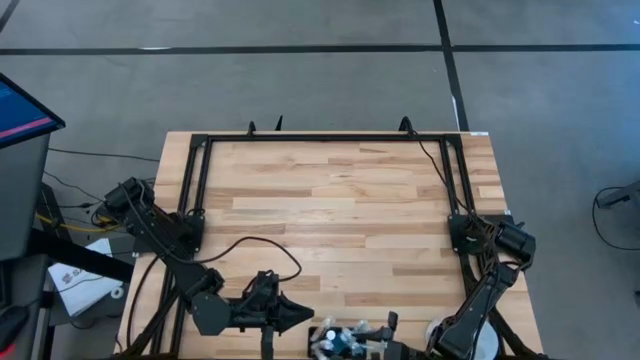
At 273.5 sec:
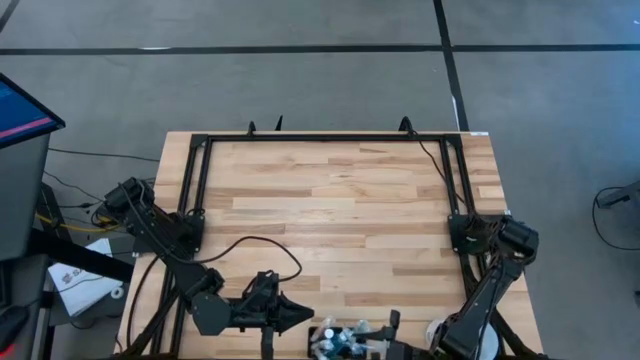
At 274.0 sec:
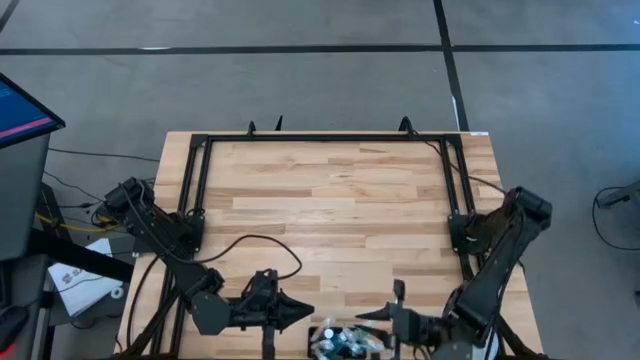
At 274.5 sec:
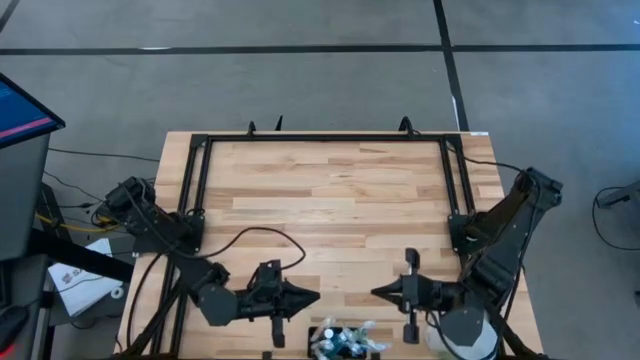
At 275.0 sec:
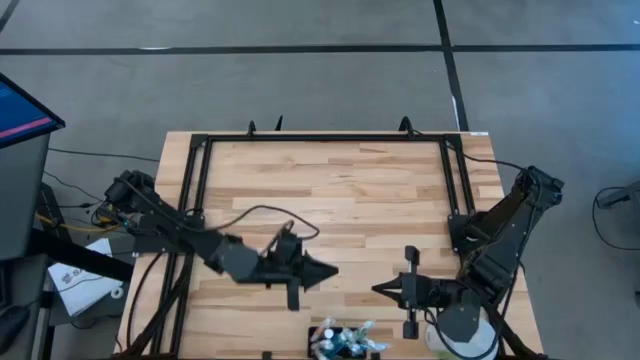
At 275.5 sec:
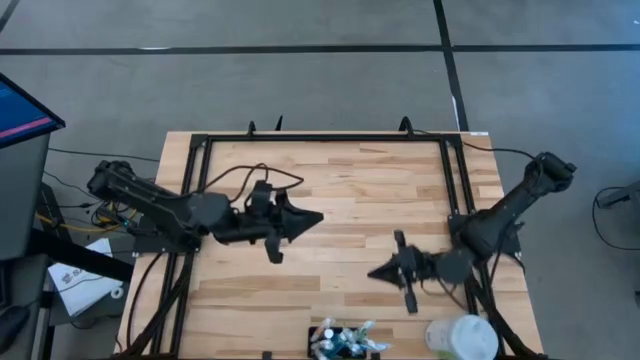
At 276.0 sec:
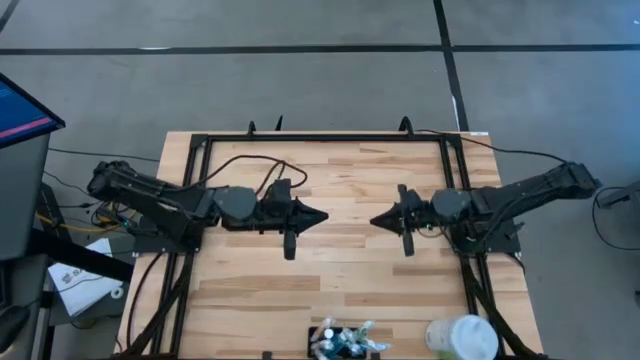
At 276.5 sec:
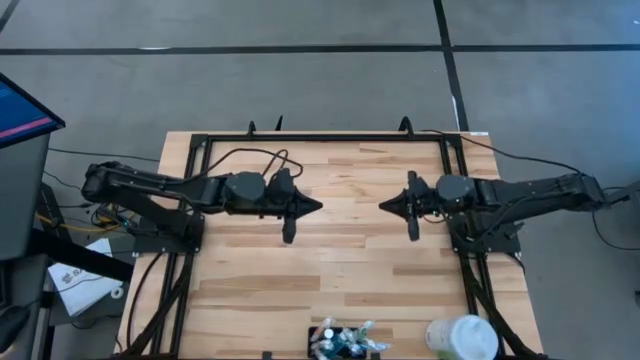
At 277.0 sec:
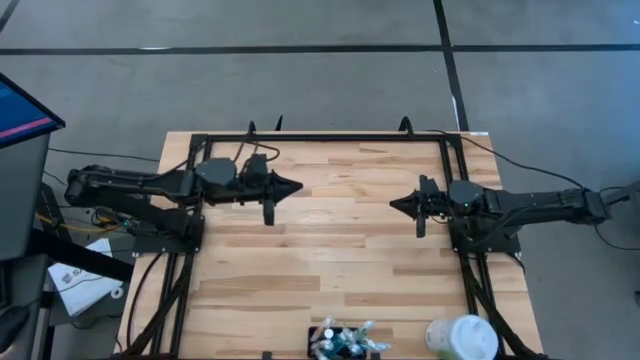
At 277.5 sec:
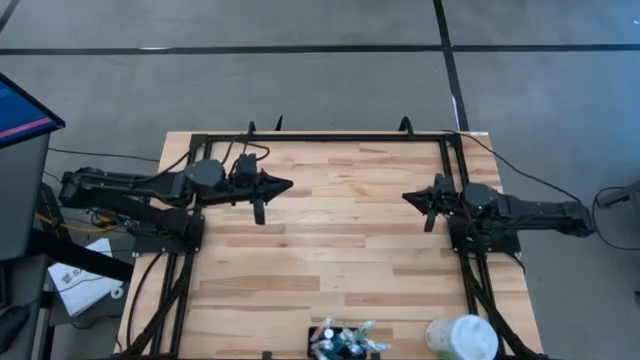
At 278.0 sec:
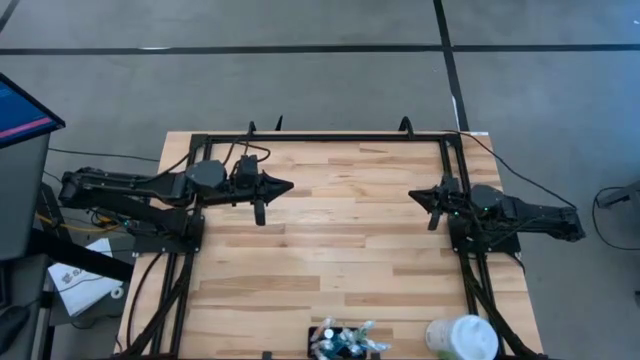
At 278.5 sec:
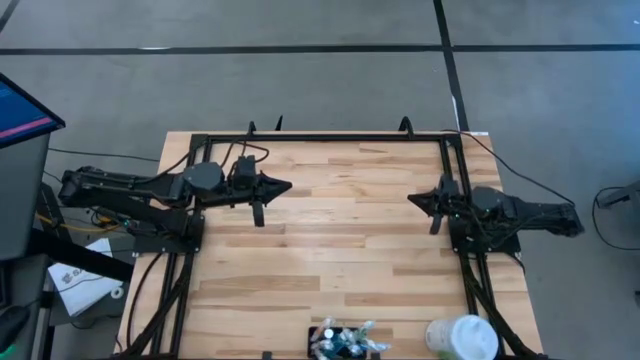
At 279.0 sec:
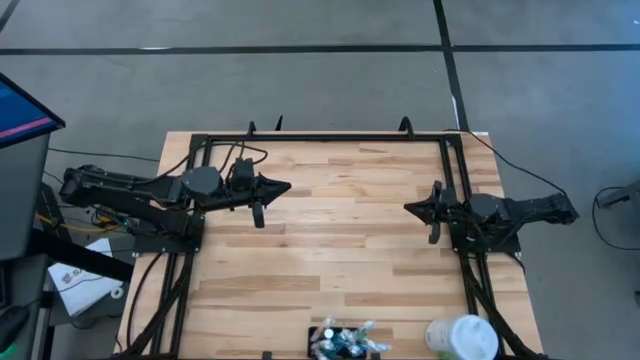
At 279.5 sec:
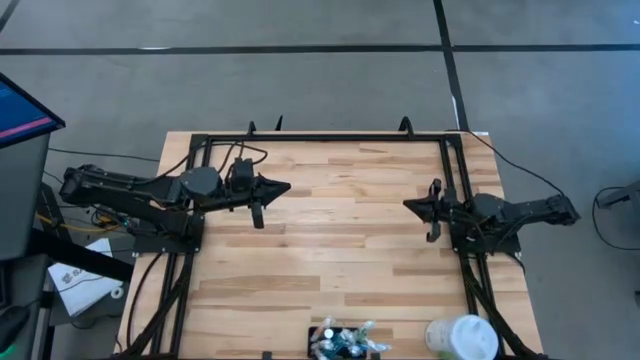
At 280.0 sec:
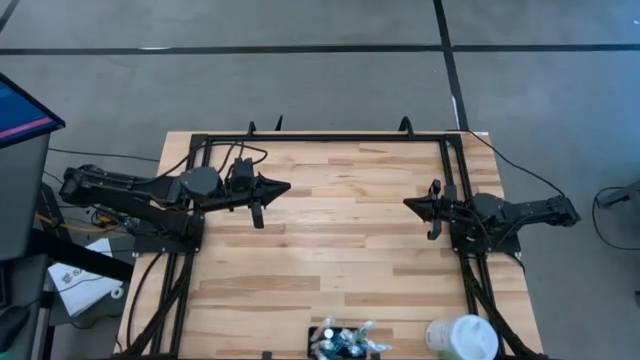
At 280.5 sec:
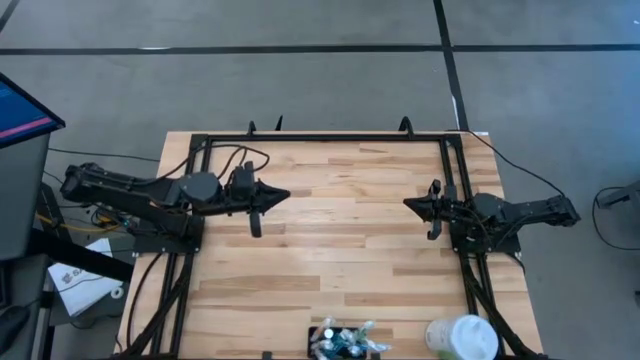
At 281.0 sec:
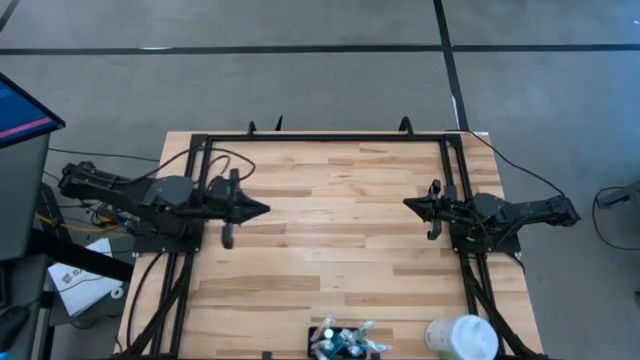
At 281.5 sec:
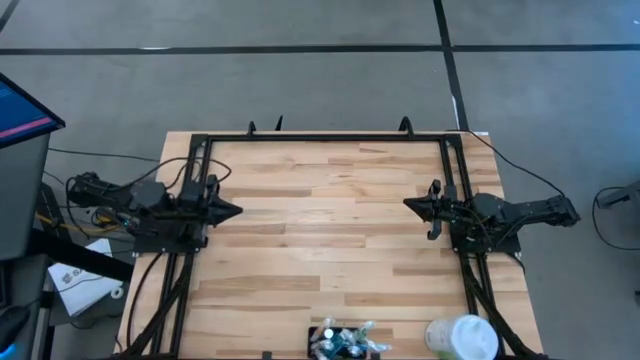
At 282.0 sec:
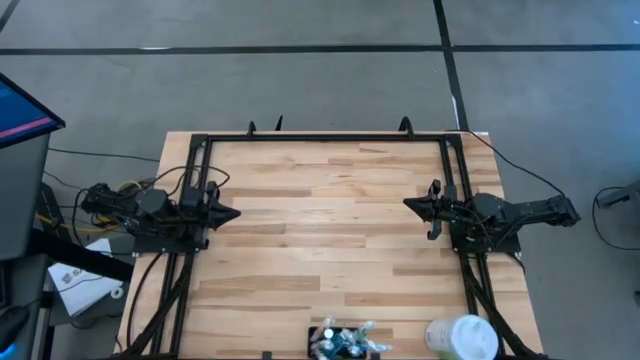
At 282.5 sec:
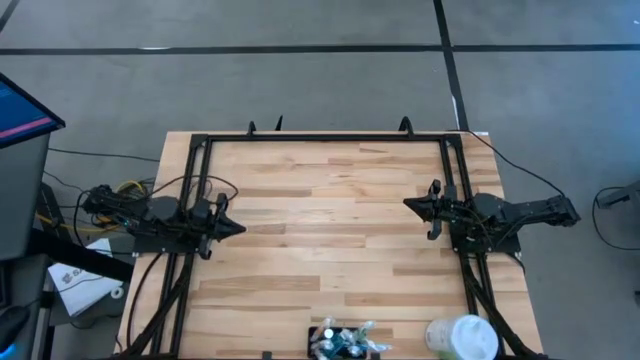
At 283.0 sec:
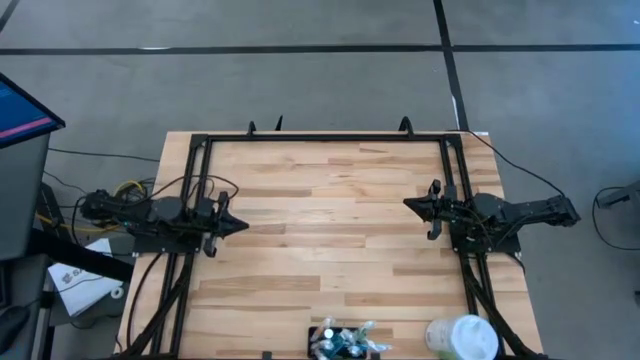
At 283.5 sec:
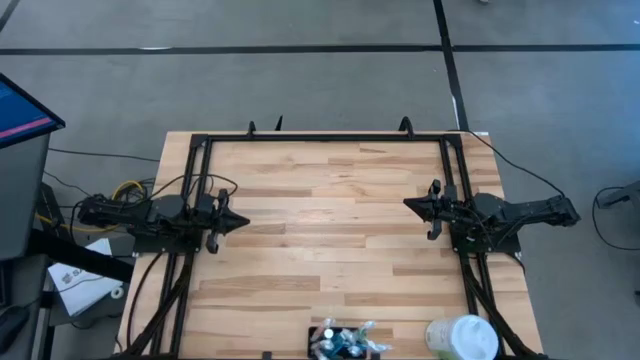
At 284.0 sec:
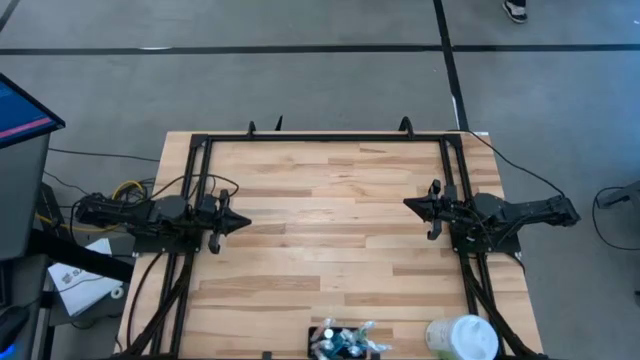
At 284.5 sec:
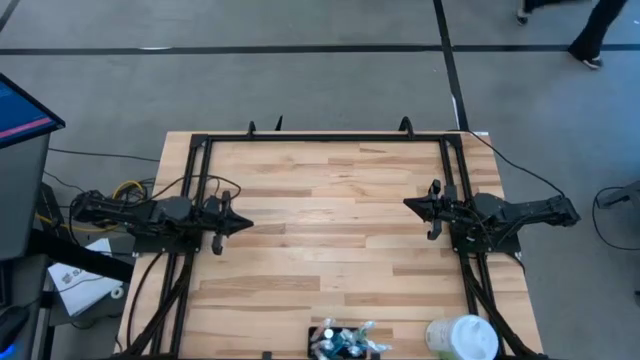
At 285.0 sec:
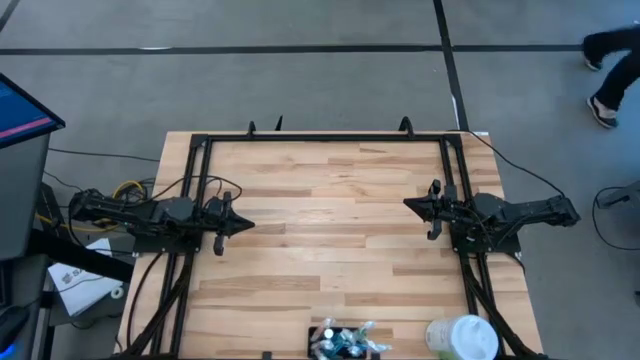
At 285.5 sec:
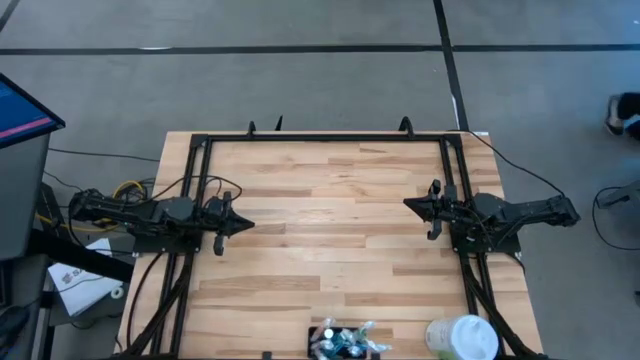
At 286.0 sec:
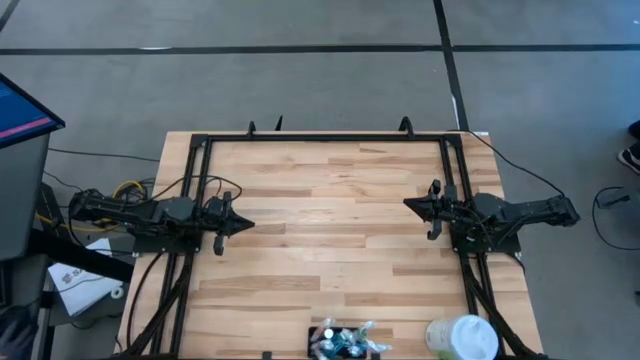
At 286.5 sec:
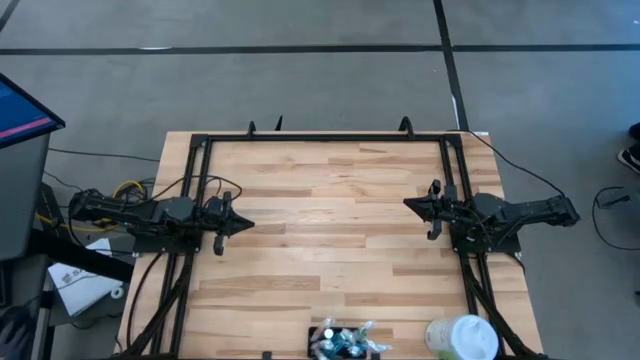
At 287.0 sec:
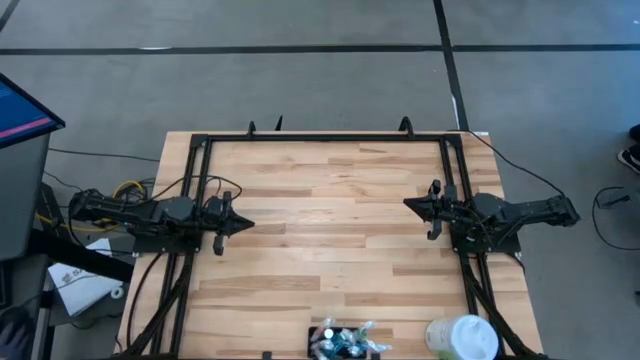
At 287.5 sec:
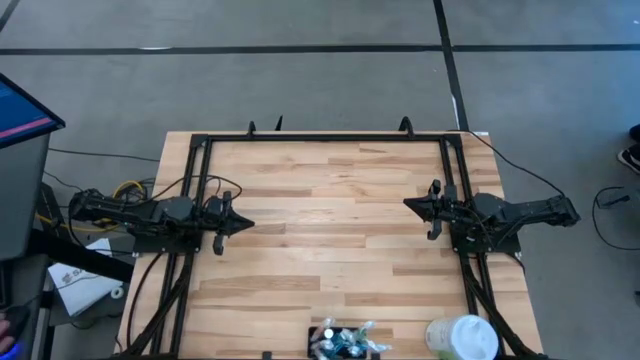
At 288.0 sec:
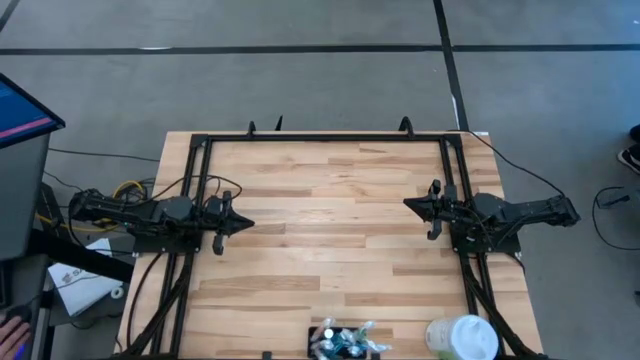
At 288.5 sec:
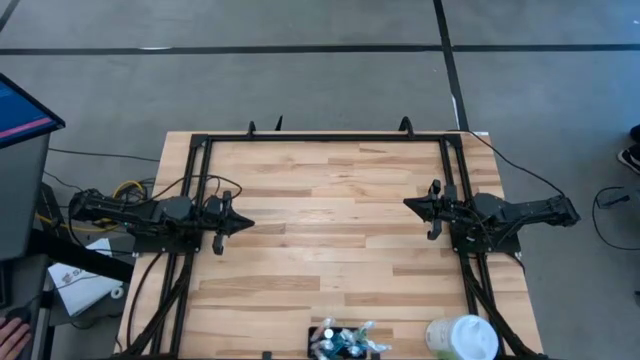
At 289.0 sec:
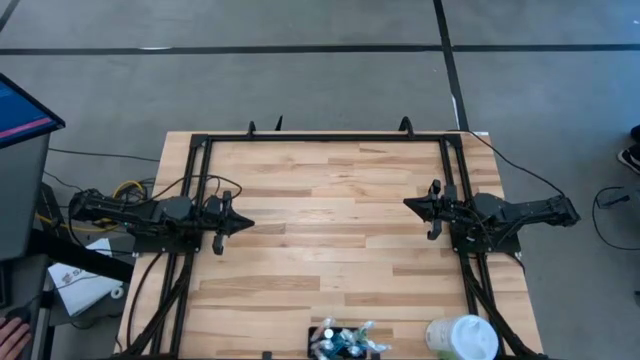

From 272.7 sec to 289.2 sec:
Task: Pick & Place toothbrushing station
Return to Home Position
